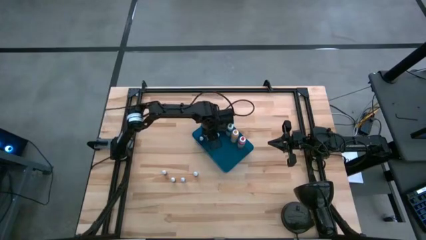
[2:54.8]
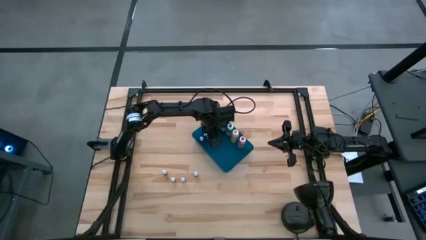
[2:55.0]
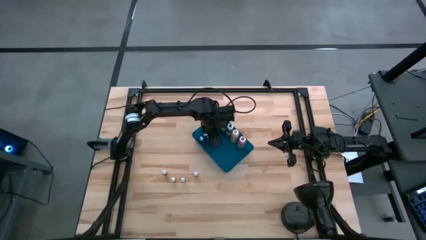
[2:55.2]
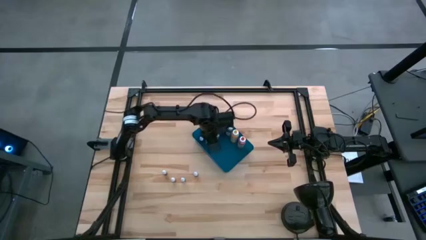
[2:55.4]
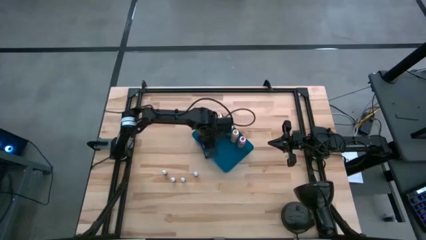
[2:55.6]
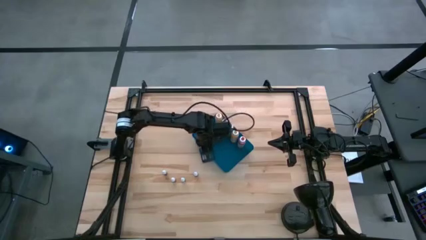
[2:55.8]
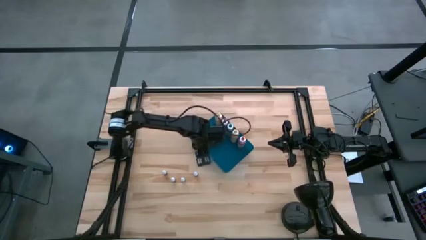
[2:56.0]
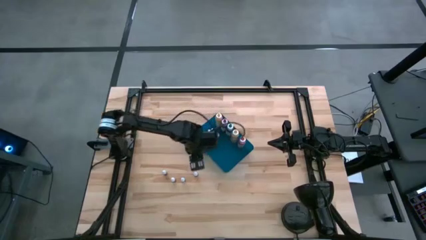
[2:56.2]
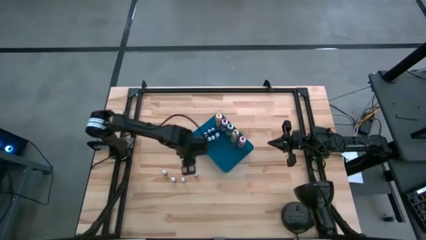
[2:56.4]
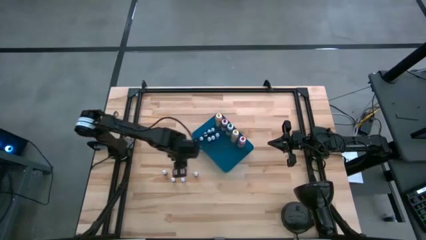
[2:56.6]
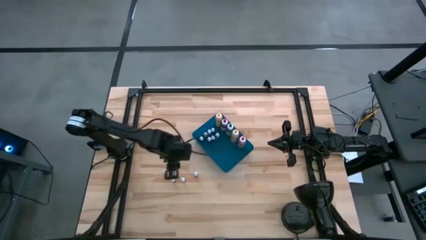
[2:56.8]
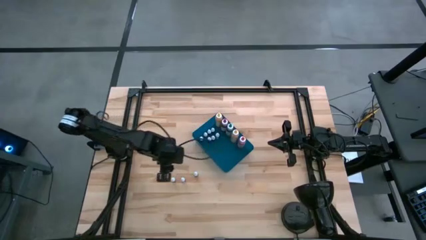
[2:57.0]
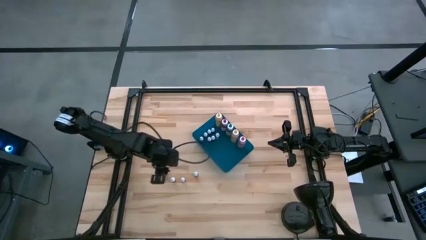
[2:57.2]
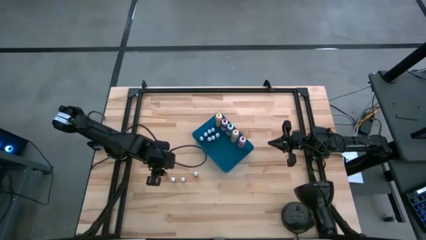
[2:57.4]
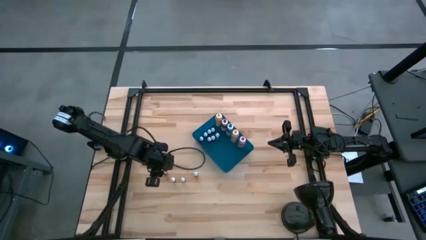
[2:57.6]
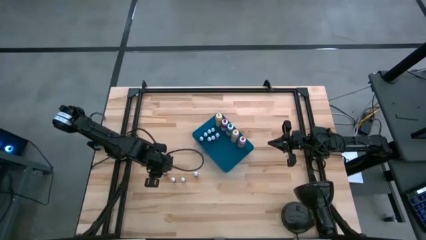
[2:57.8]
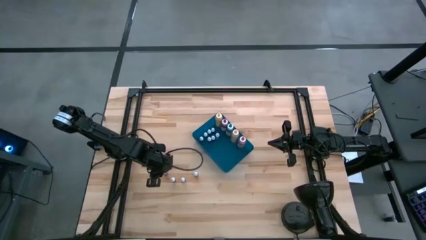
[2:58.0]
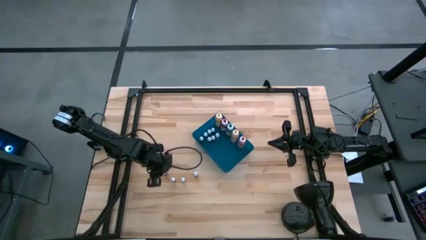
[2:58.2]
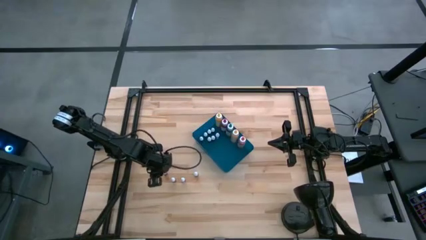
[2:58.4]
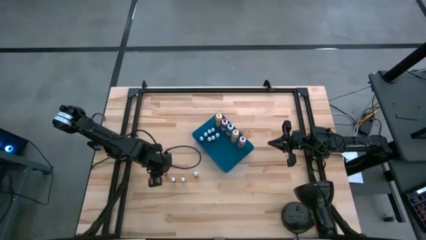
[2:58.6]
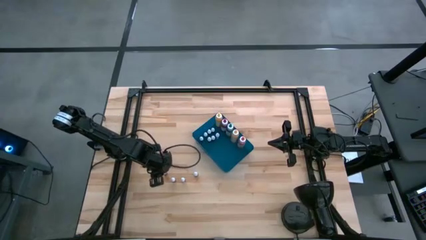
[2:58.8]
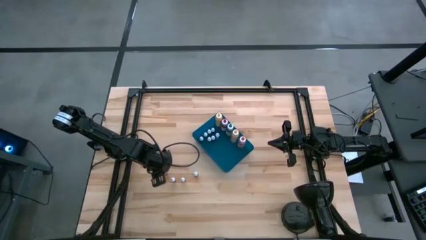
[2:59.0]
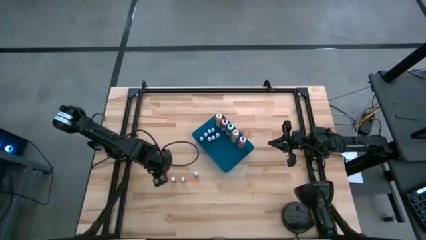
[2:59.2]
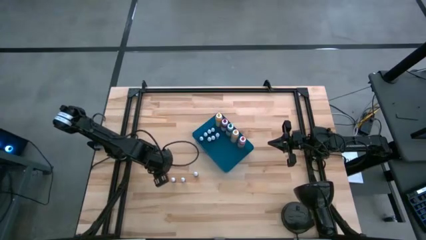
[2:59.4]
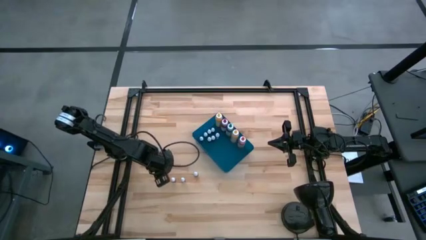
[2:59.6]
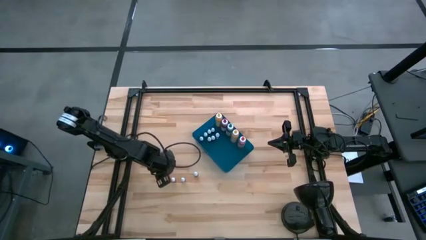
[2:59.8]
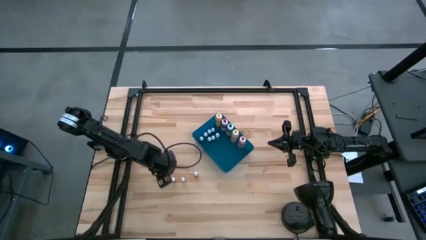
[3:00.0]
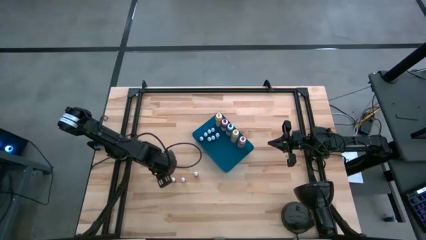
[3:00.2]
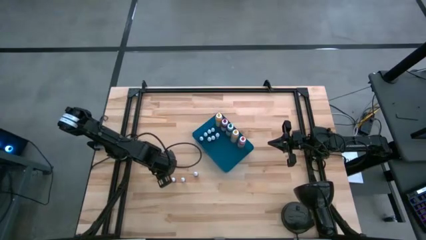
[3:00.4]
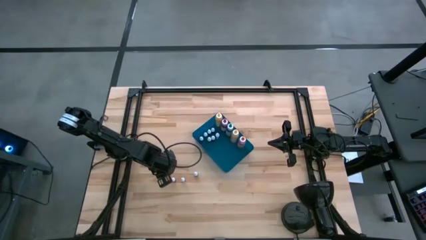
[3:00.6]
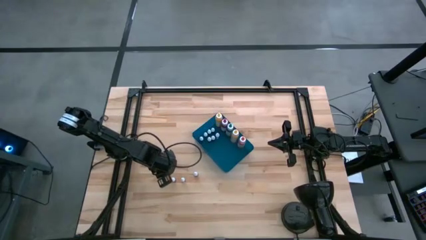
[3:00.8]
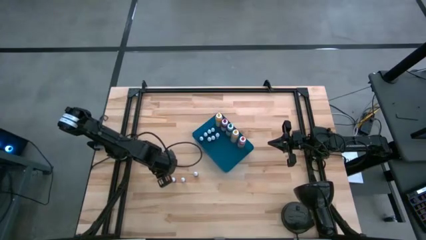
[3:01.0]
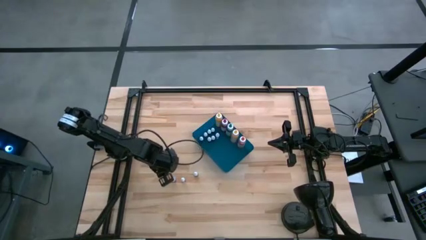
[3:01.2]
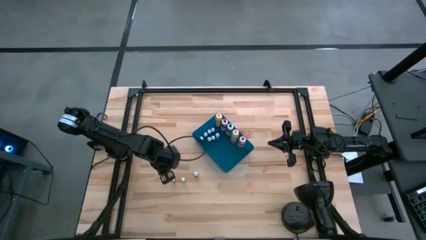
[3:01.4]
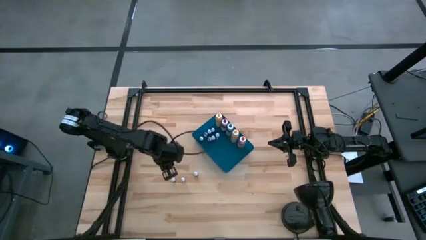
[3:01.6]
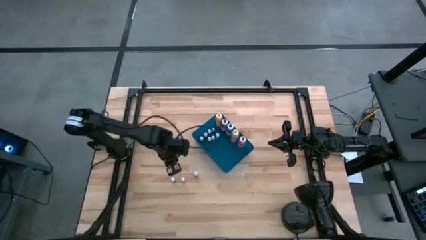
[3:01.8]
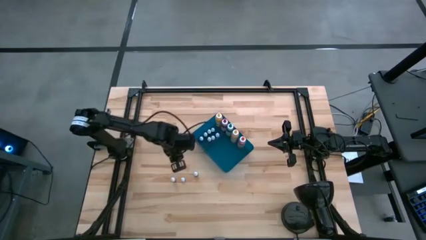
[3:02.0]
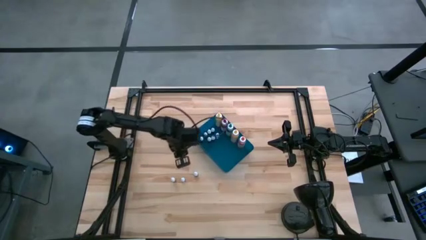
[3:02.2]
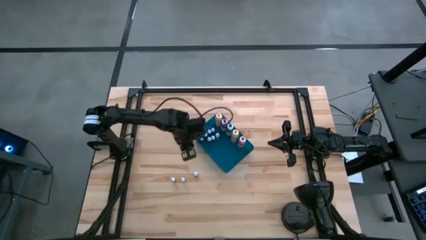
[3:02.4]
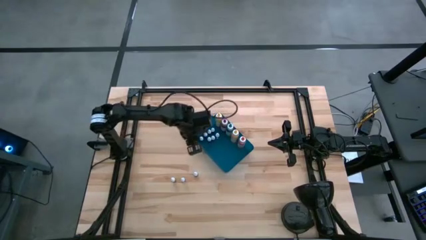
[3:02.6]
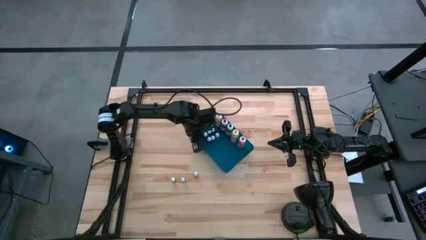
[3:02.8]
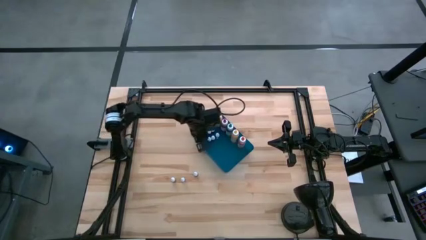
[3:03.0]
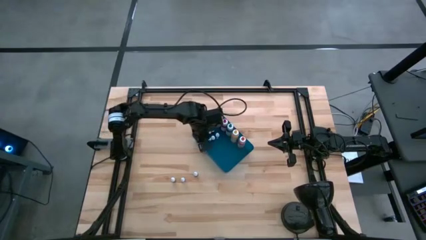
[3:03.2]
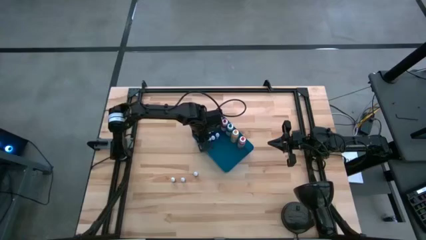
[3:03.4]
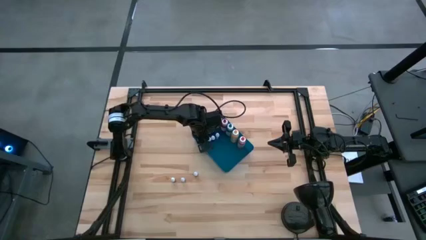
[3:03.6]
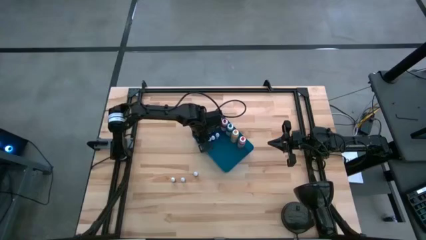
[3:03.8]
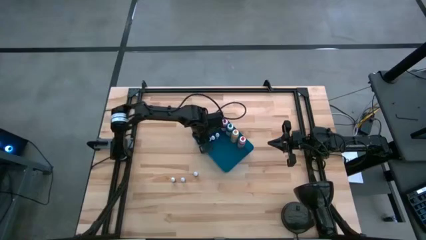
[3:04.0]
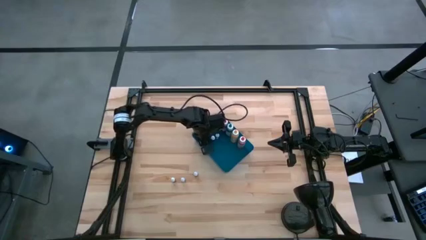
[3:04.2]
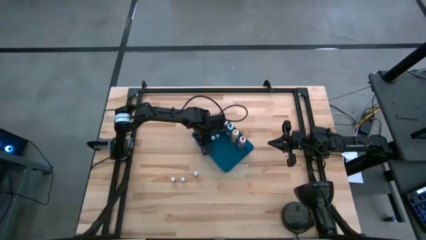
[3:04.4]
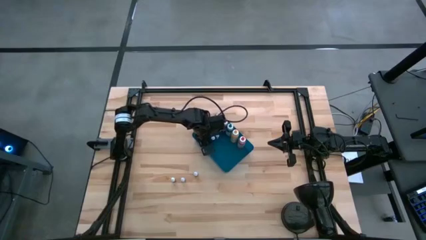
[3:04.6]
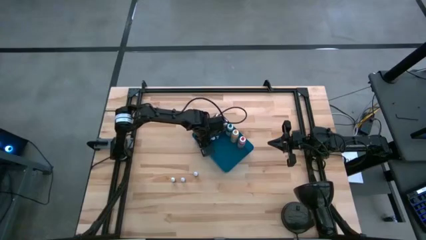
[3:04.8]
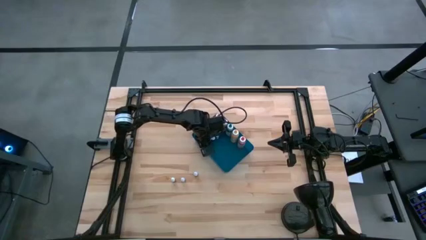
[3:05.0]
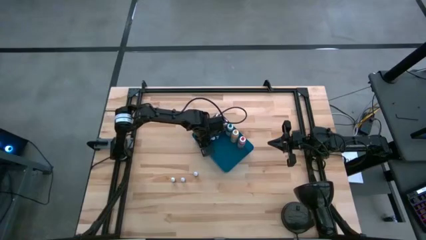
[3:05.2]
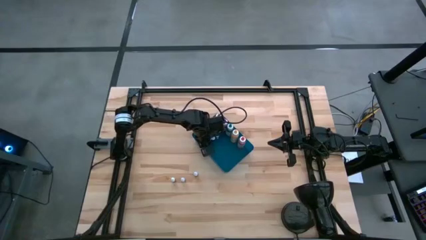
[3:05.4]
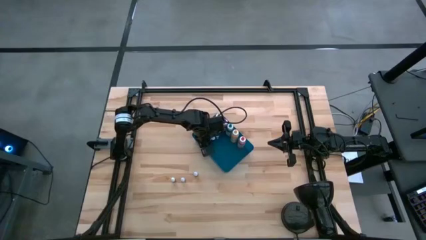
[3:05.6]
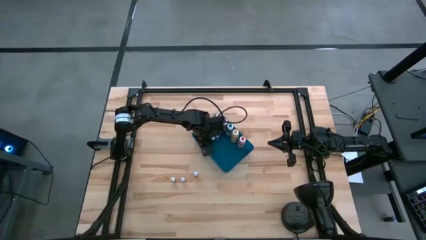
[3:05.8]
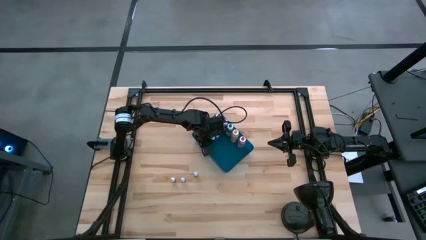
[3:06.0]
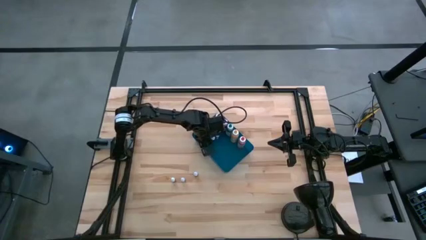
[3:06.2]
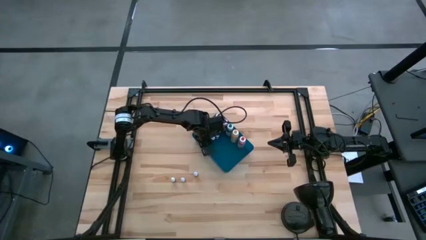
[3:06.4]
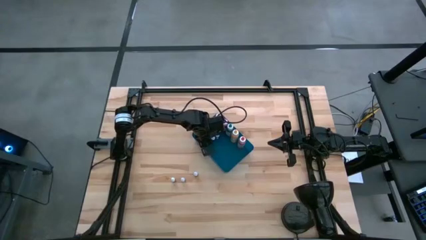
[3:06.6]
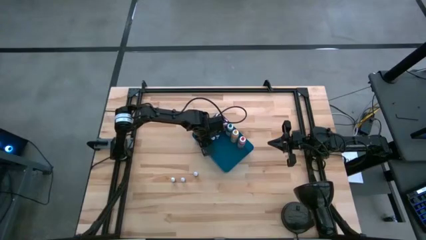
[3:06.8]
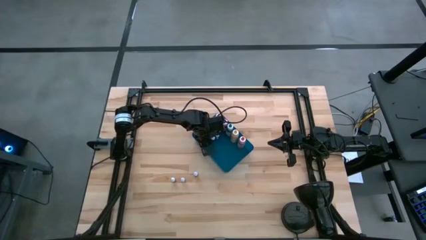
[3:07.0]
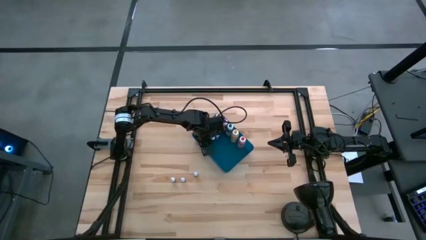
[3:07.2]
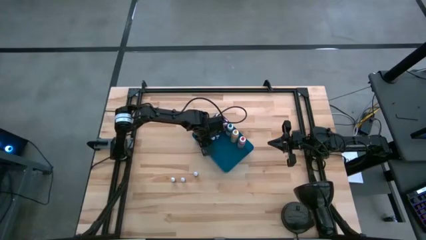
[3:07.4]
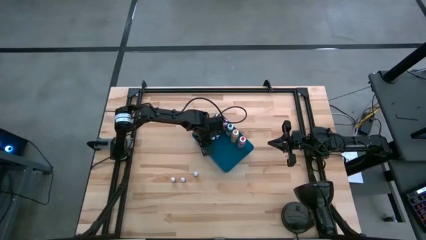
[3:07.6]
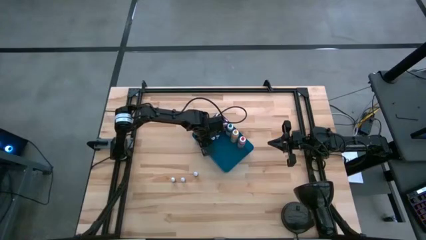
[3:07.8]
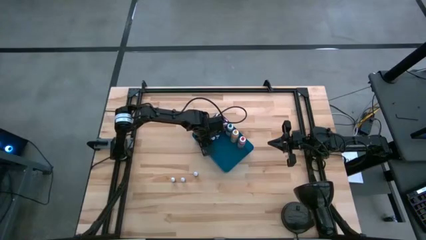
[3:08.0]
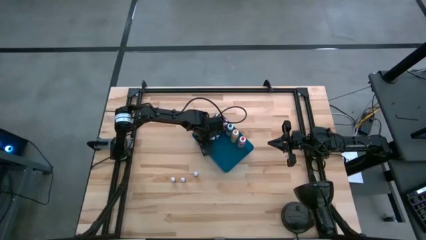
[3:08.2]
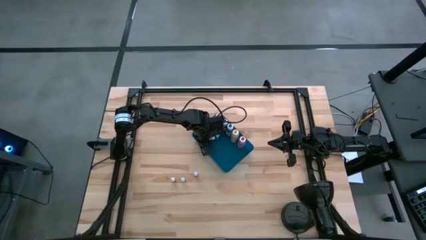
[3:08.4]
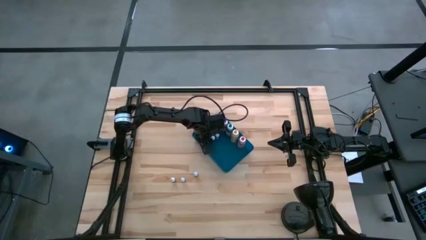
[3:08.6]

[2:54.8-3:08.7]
Task: Pick & Place food coloring
Put the red food coloring bottle into the blue bin

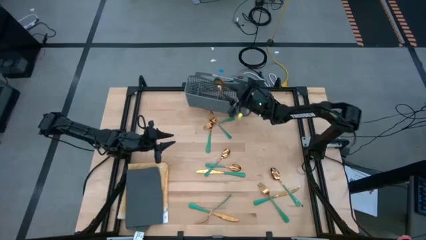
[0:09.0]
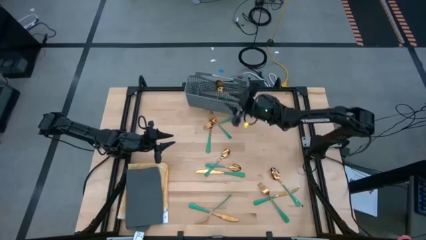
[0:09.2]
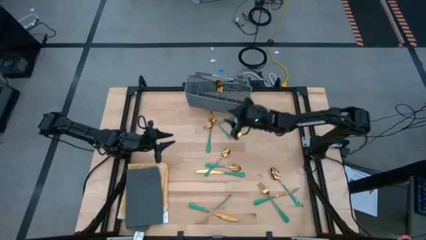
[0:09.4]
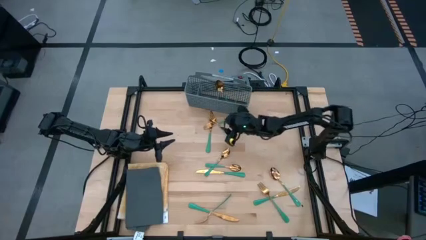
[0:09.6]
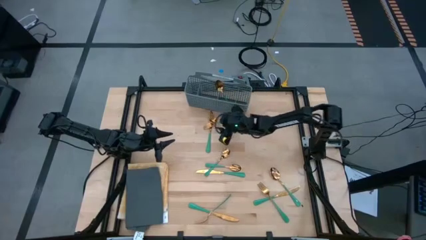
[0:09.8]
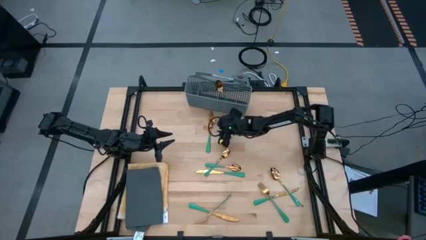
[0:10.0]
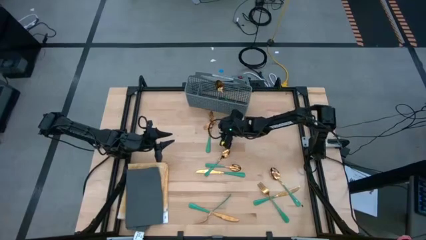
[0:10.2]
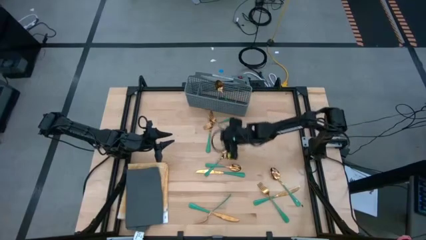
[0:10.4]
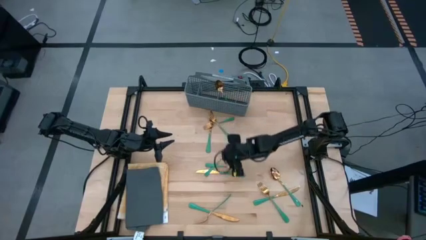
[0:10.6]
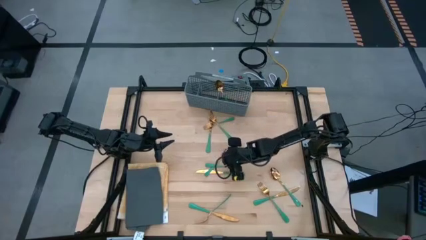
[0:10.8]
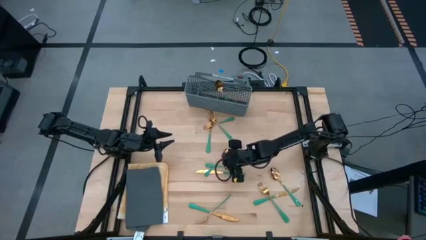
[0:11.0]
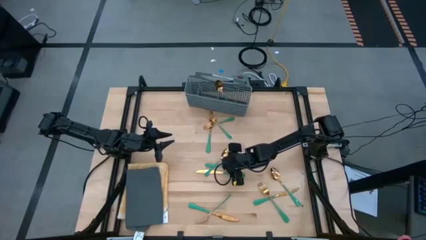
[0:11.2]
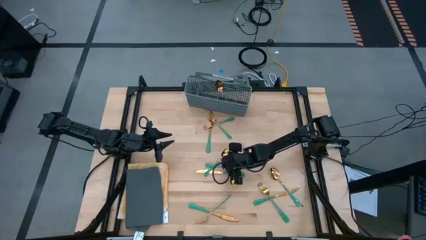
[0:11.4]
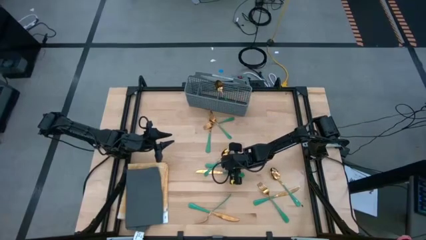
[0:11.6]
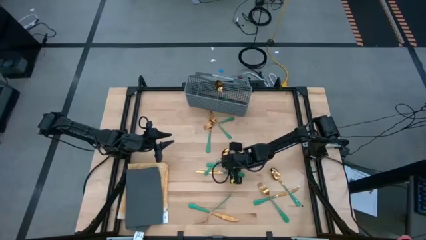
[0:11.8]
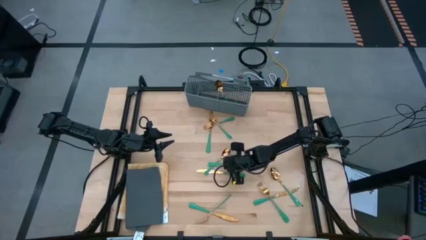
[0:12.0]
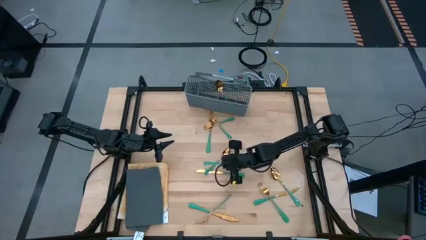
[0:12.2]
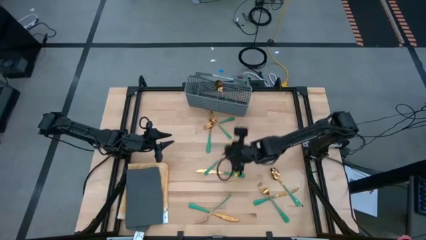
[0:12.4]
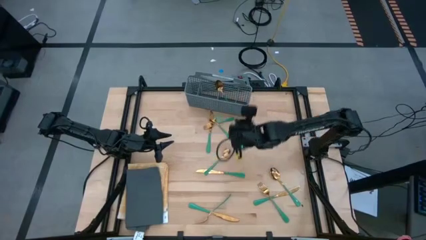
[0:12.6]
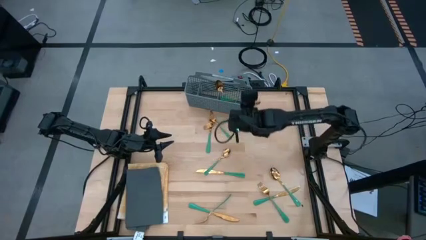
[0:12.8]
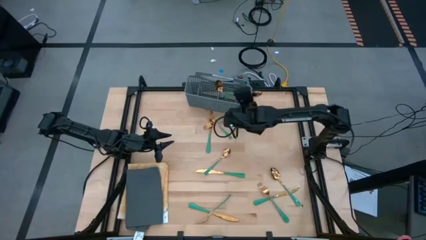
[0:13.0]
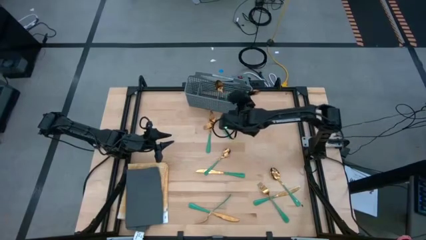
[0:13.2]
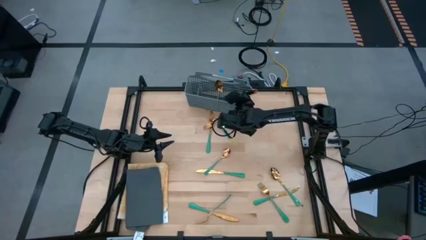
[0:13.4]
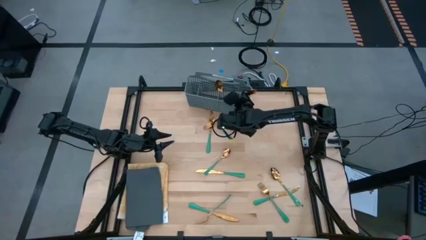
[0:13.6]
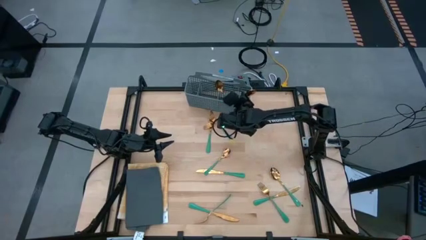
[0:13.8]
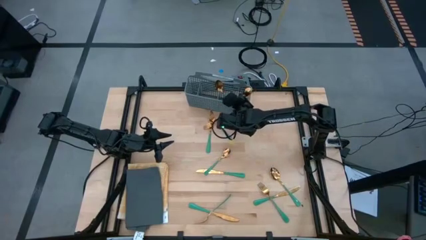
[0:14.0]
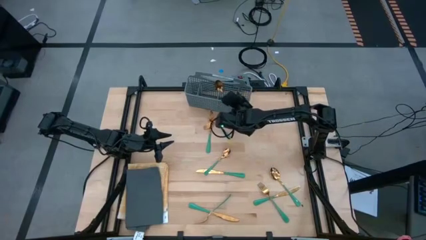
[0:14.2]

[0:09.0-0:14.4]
Task: Sort silverware
Put the green spoon into the gray silverware holder
